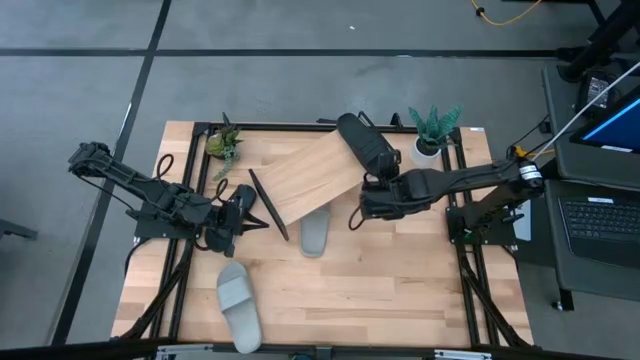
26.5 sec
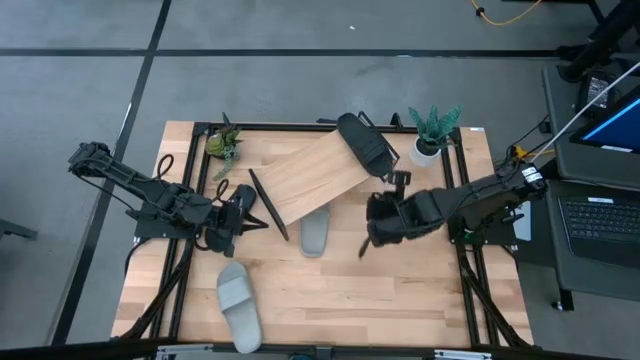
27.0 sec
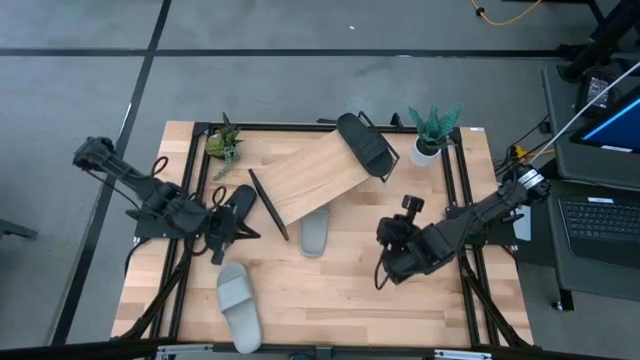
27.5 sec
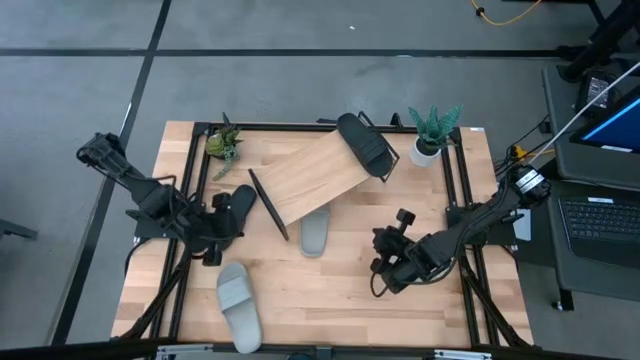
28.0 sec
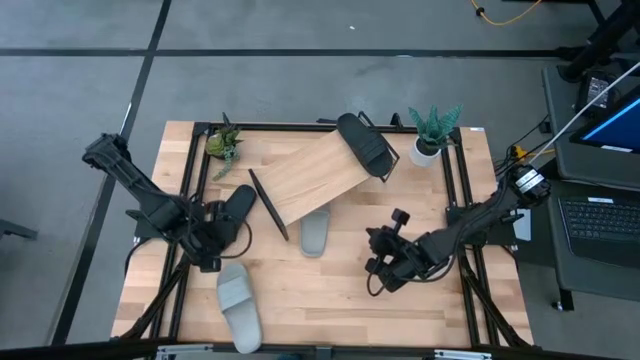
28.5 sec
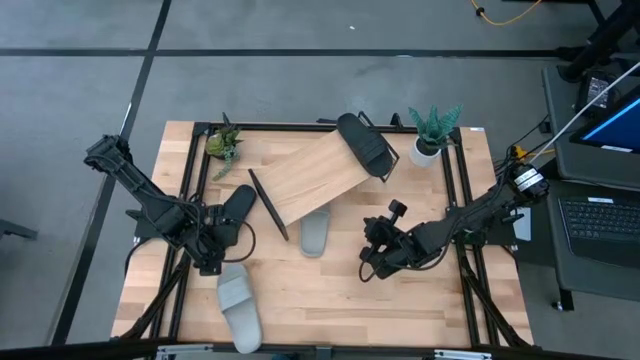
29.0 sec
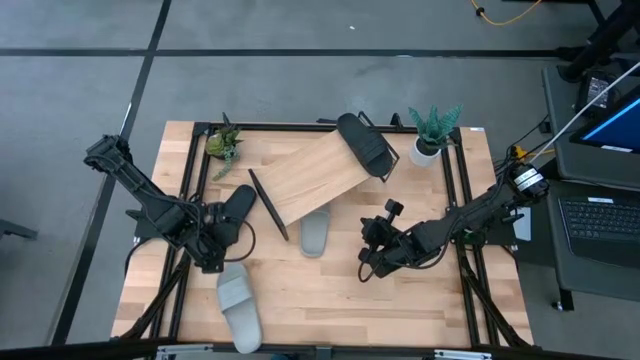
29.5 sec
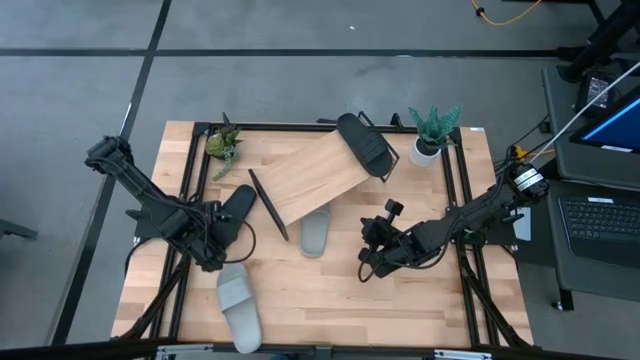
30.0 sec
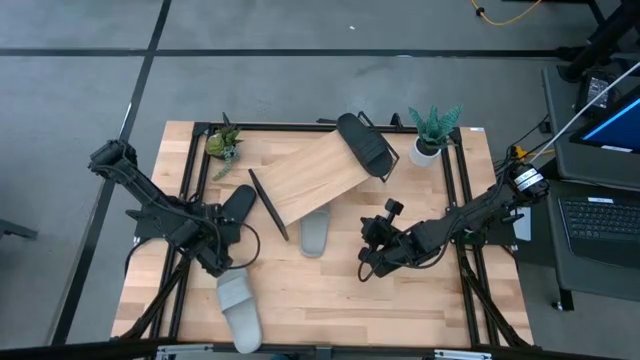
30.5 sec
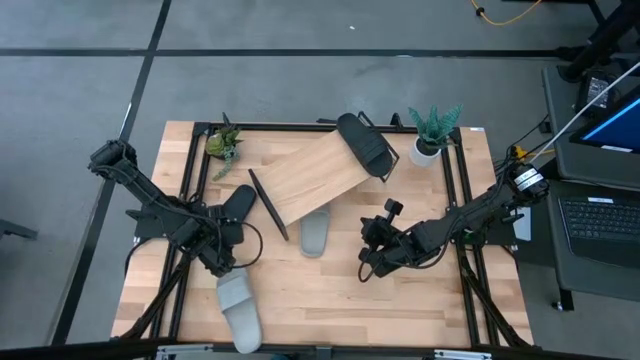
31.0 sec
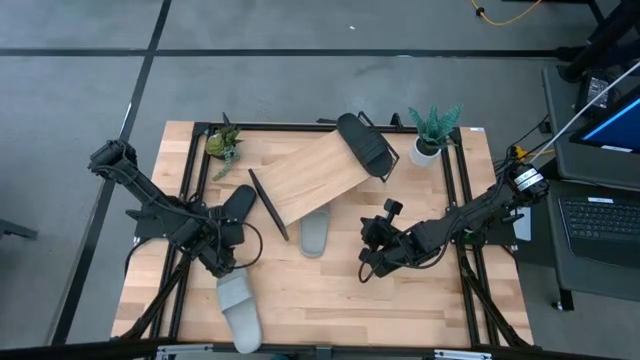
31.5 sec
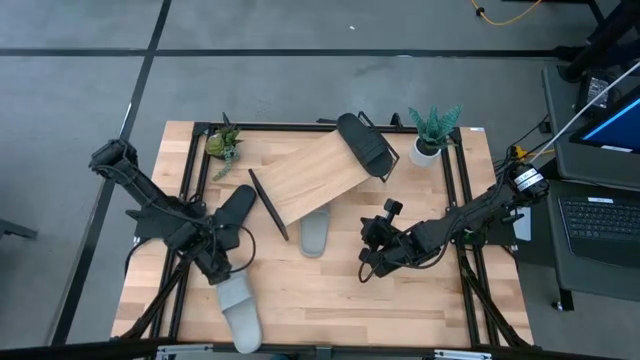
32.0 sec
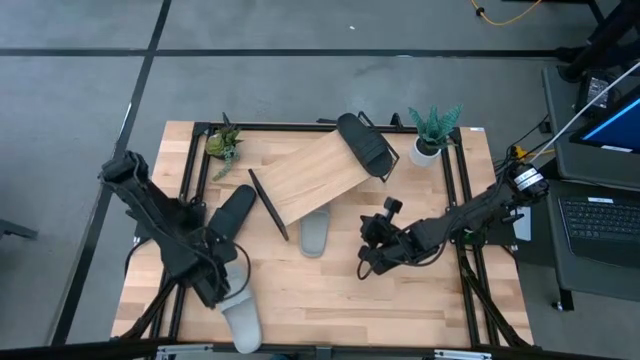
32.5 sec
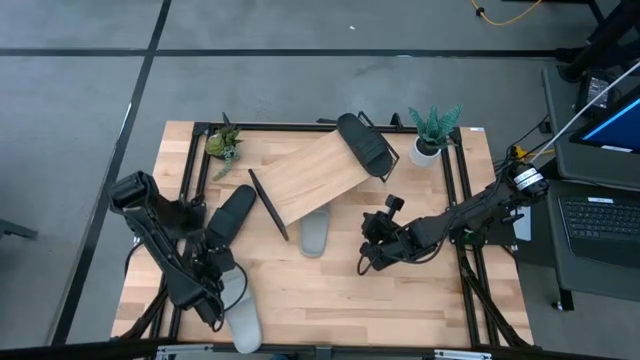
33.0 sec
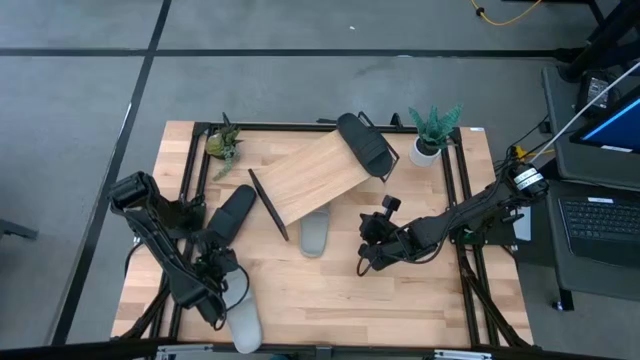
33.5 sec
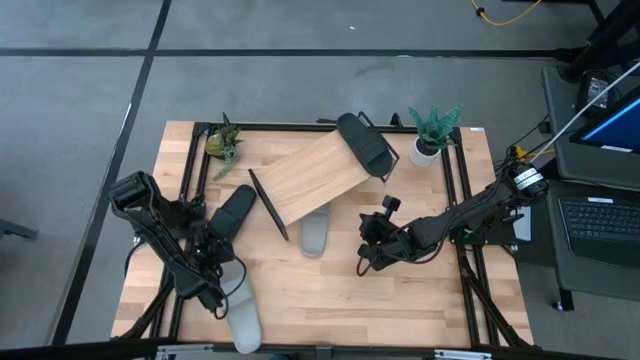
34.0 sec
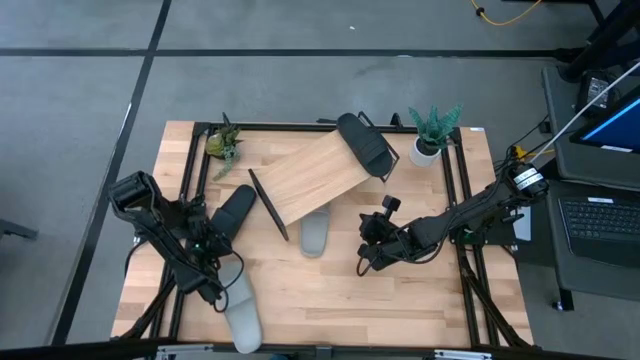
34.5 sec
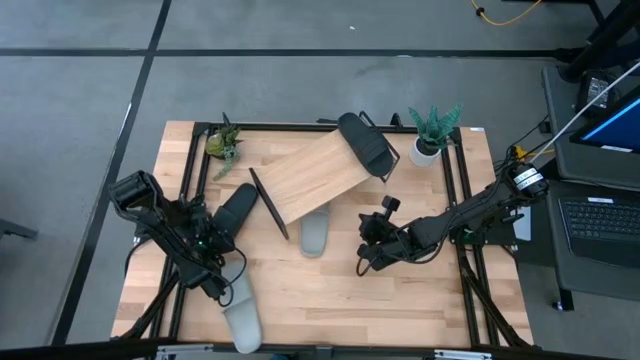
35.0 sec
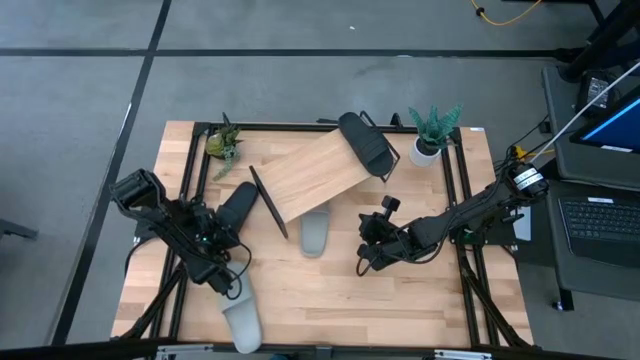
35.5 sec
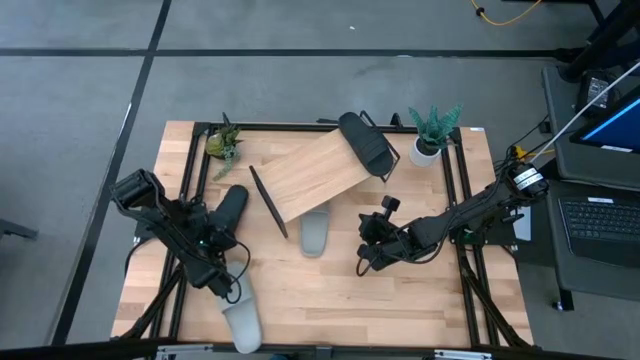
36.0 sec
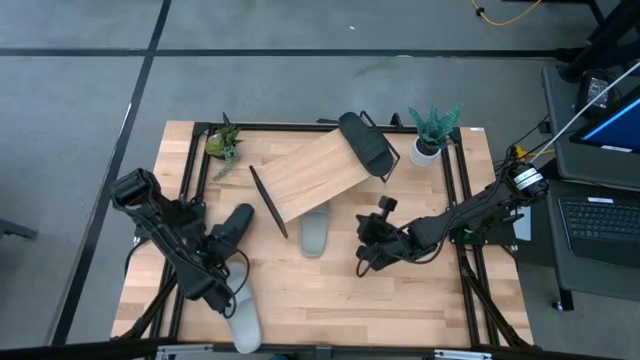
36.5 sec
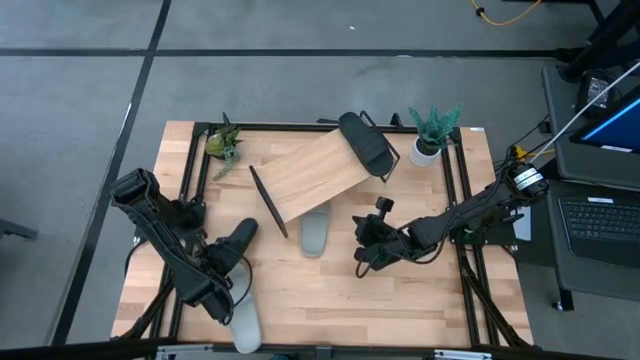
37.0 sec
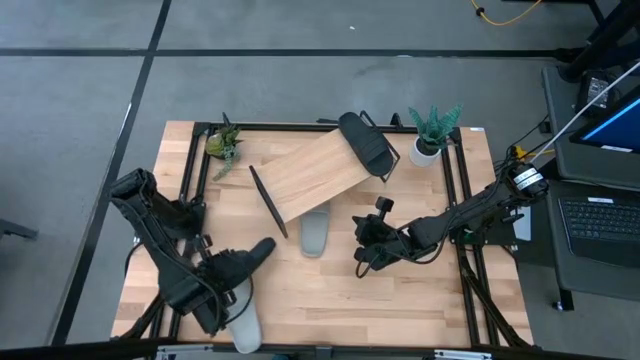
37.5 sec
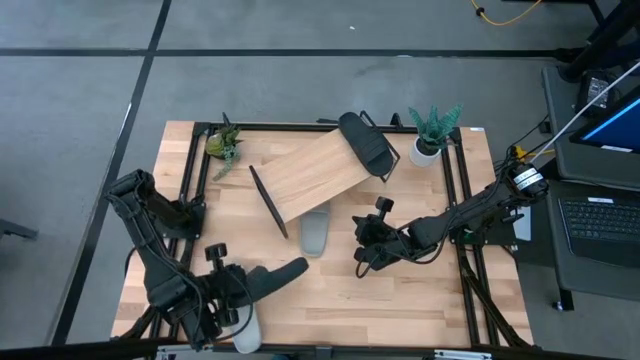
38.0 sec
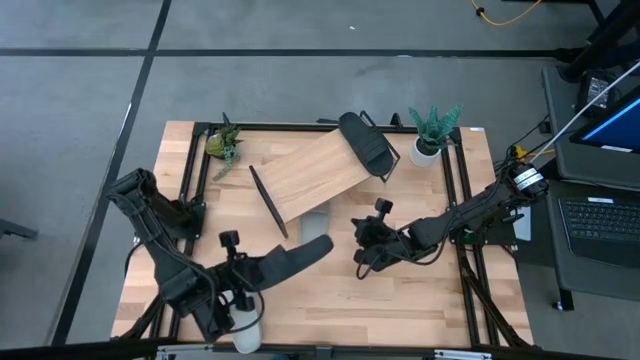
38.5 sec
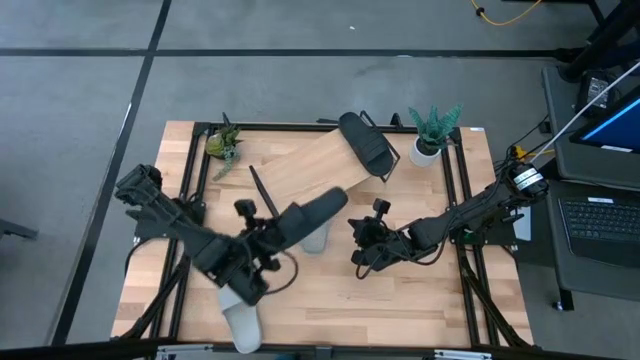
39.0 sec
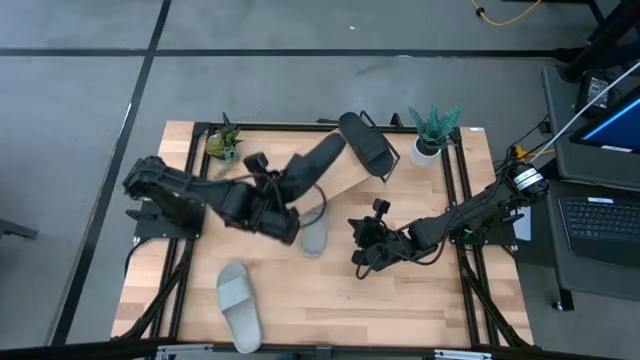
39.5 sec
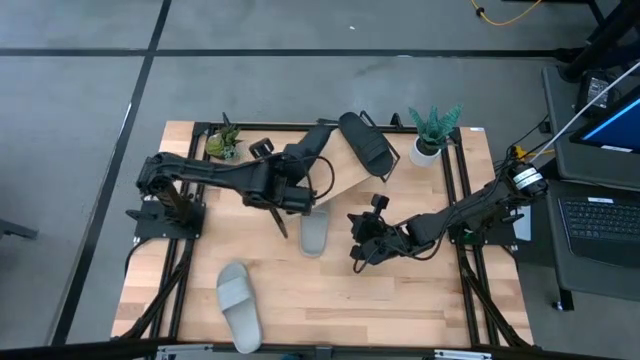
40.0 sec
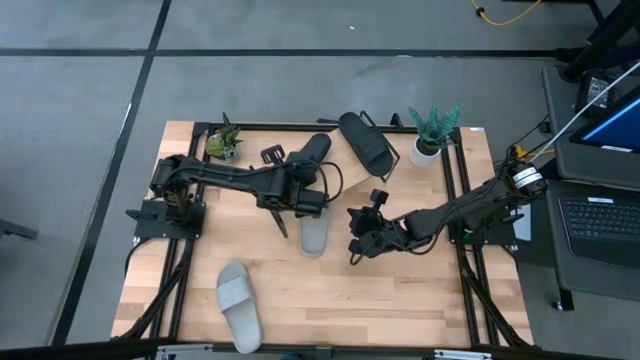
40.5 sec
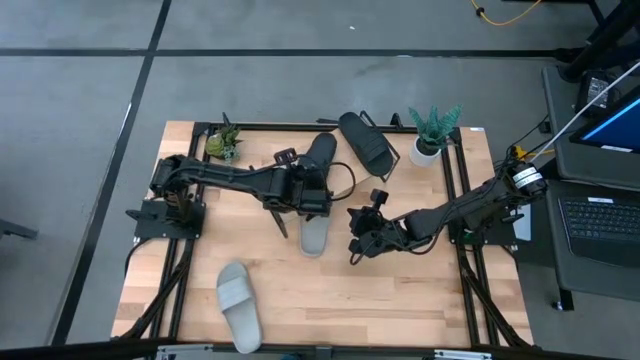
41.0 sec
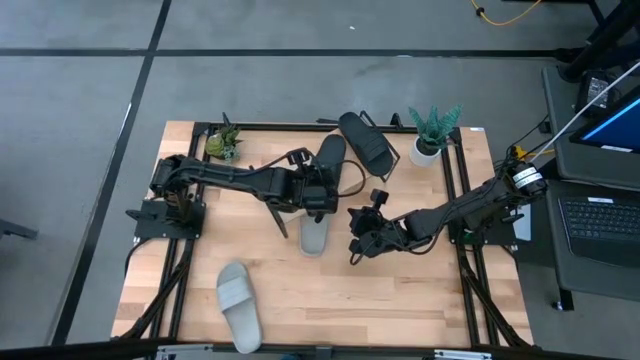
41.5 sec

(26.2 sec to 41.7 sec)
Task: Pick and place slides into the shelf
Put the black slipper on the shelf

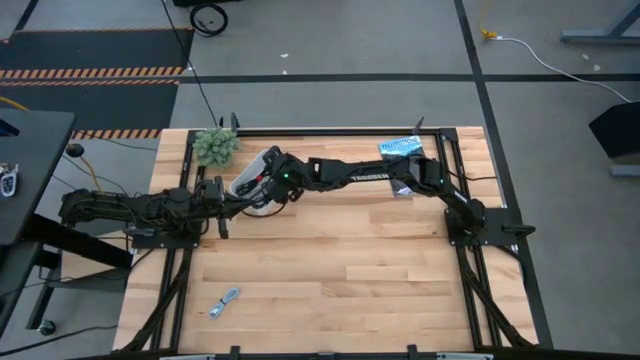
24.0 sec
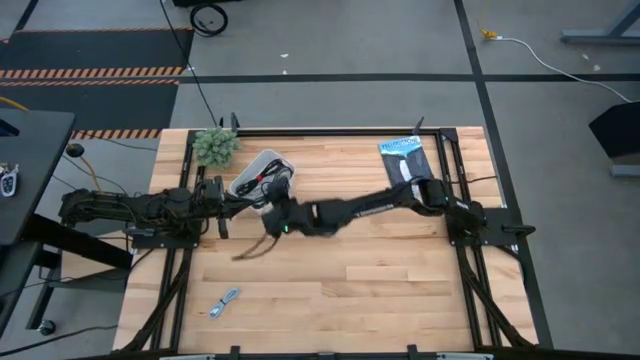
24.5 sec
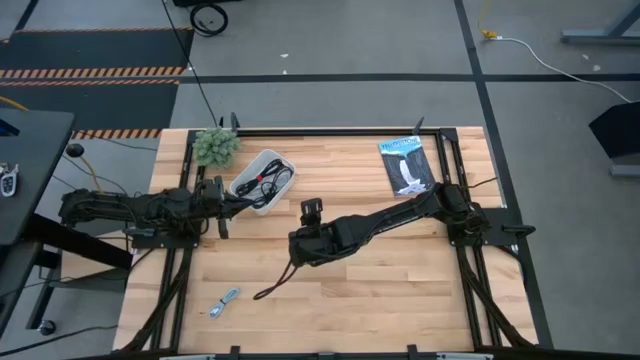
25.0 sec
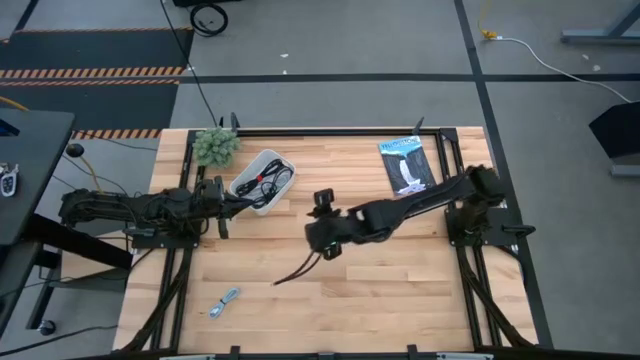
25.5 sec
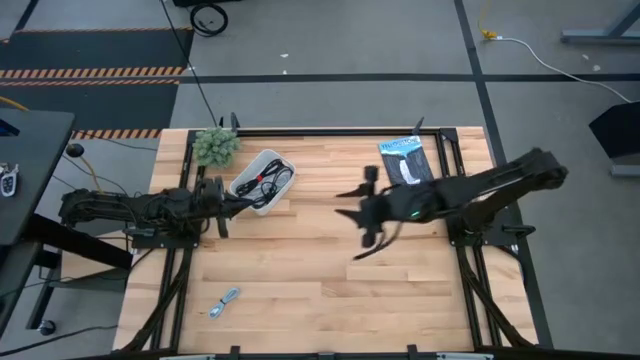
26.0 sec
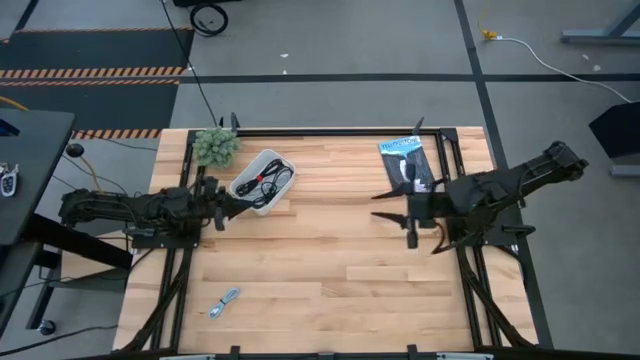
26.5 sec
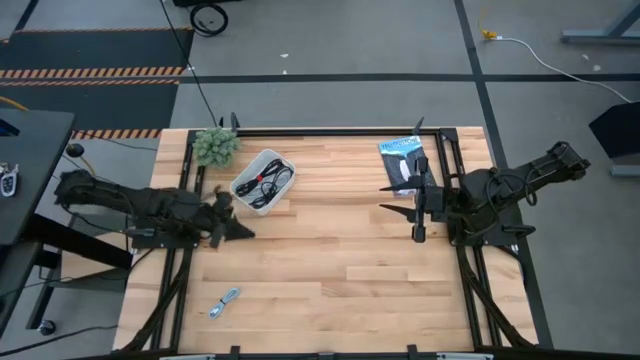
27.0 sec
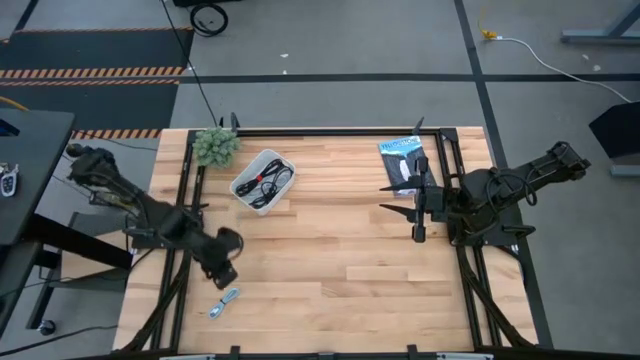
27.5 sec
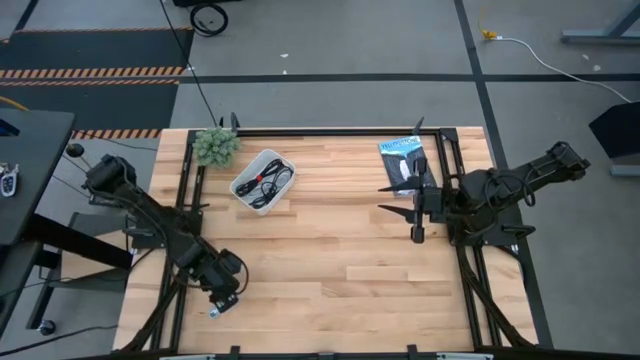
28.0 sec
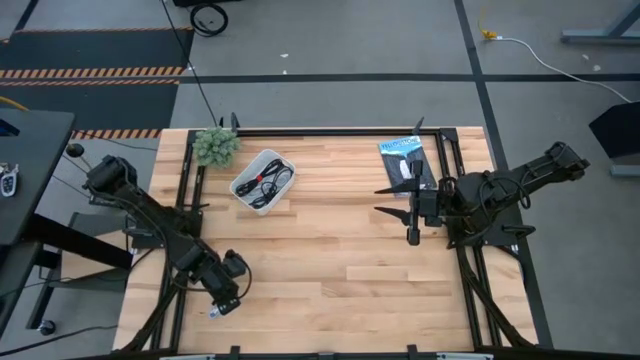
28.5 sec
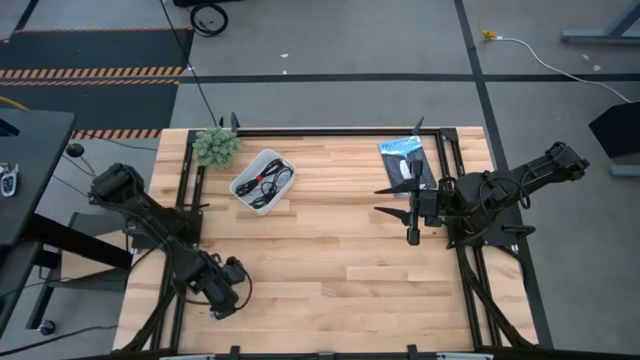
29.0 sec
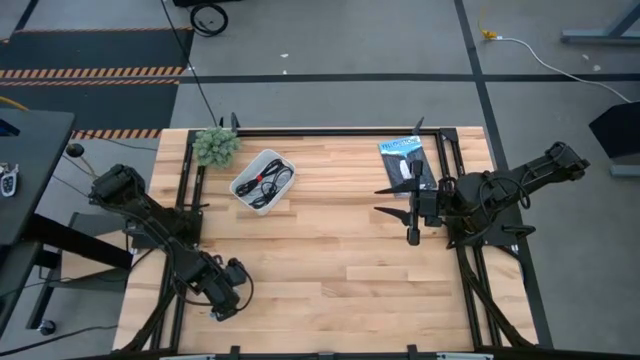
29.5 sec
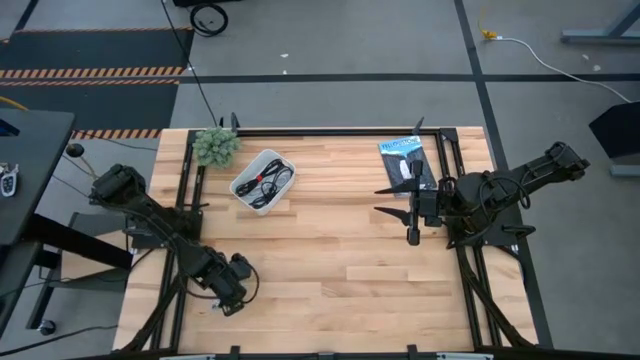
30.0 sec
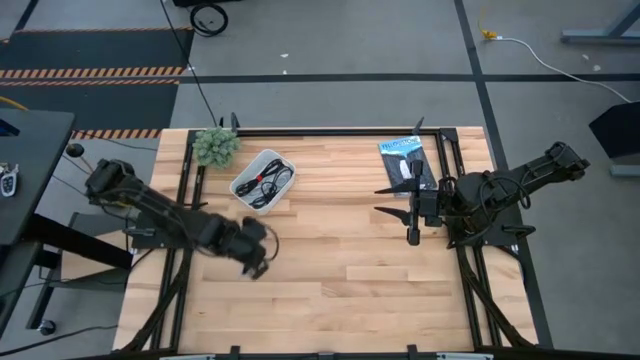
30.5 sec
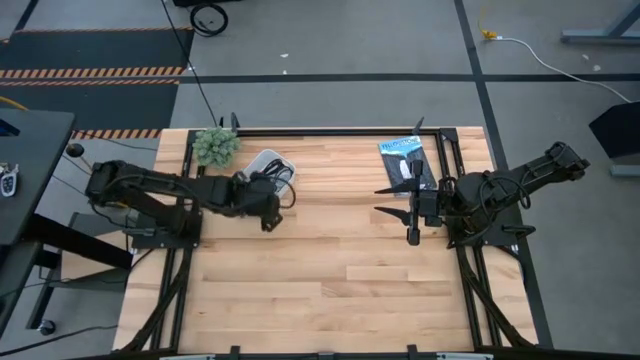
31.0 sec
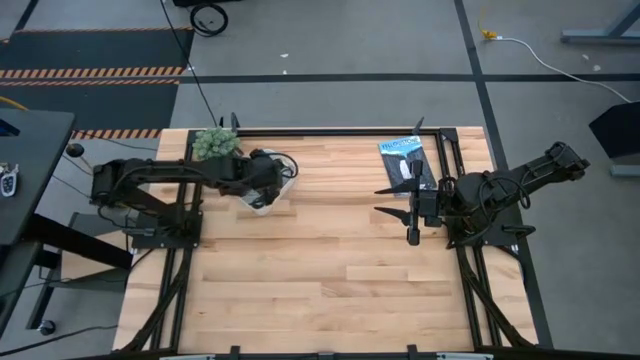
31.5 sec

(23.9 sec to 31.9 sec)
Task: Pick and place USB-C Cables
Put the blue charger cable into the white bin
